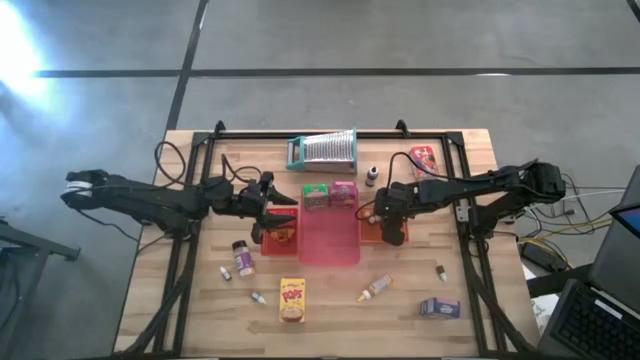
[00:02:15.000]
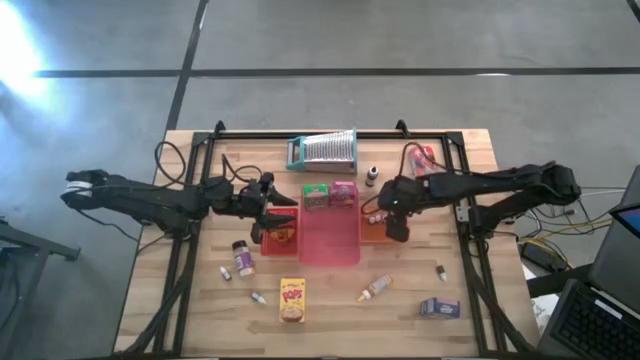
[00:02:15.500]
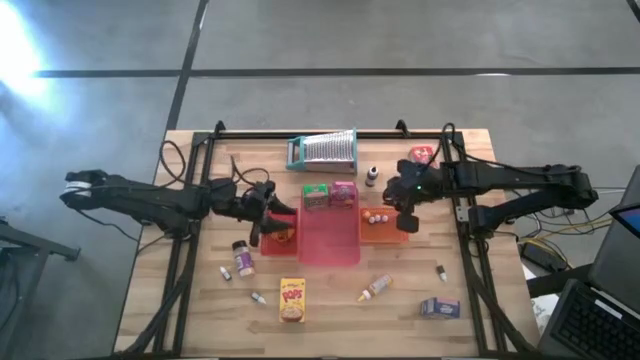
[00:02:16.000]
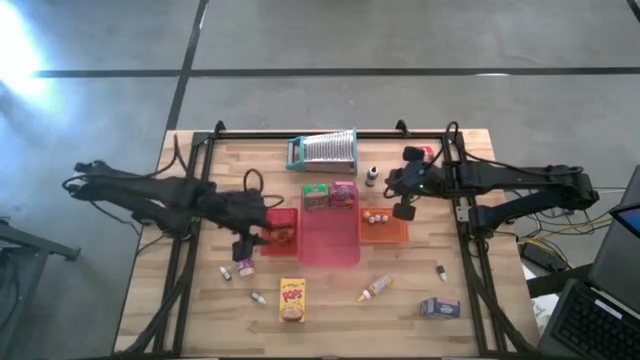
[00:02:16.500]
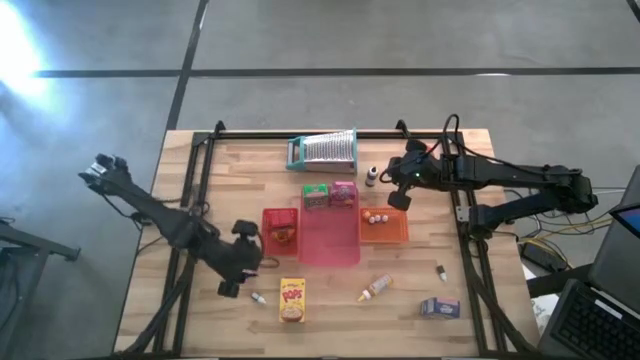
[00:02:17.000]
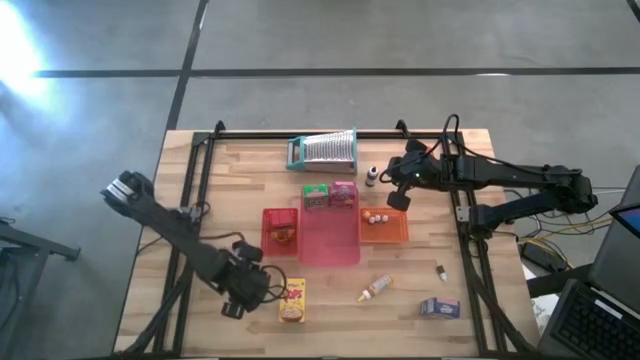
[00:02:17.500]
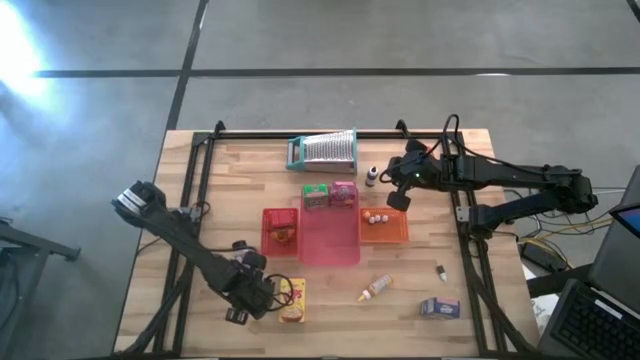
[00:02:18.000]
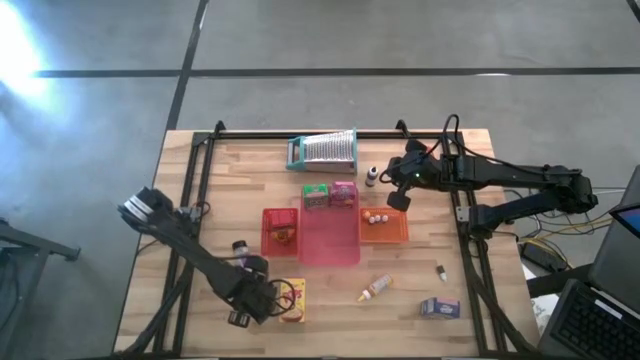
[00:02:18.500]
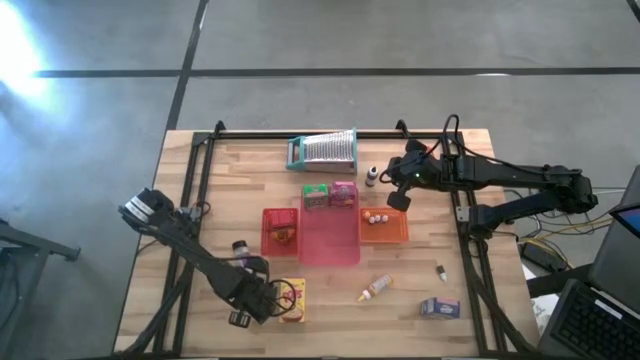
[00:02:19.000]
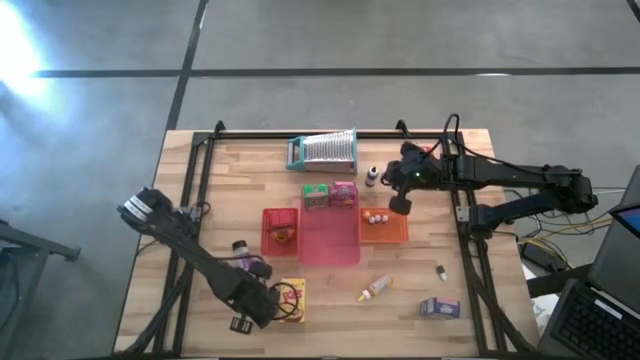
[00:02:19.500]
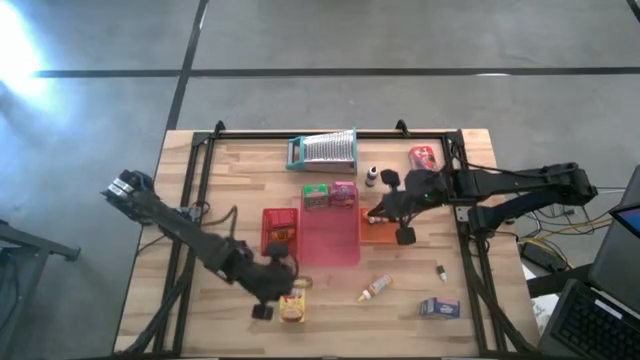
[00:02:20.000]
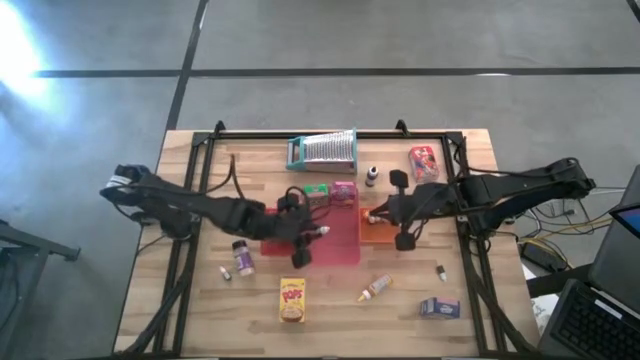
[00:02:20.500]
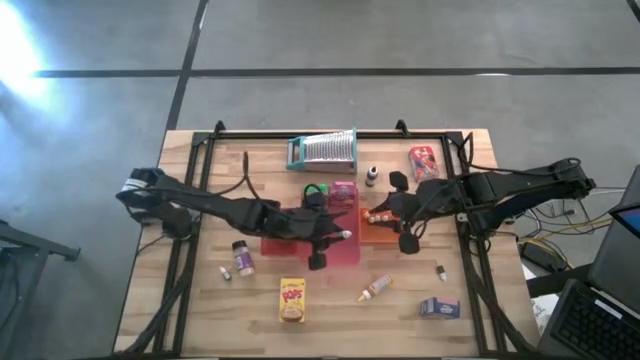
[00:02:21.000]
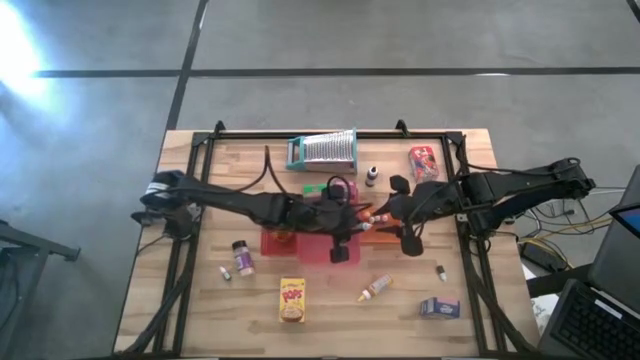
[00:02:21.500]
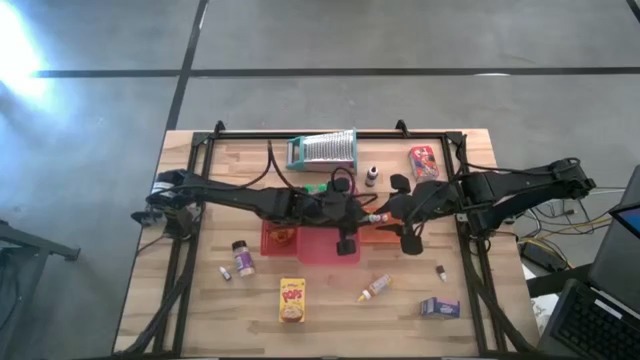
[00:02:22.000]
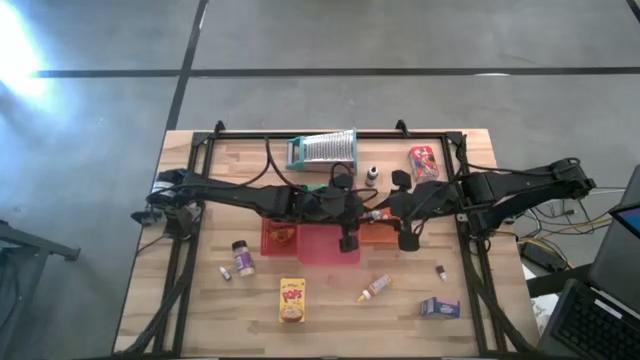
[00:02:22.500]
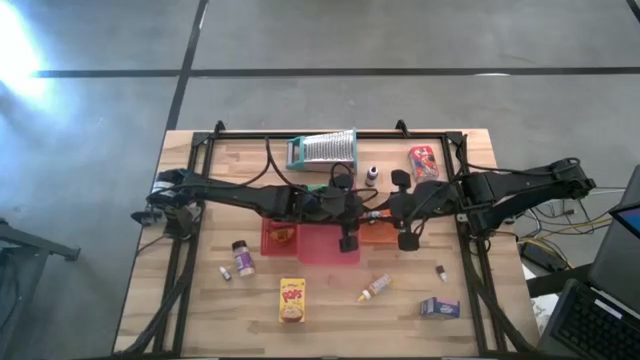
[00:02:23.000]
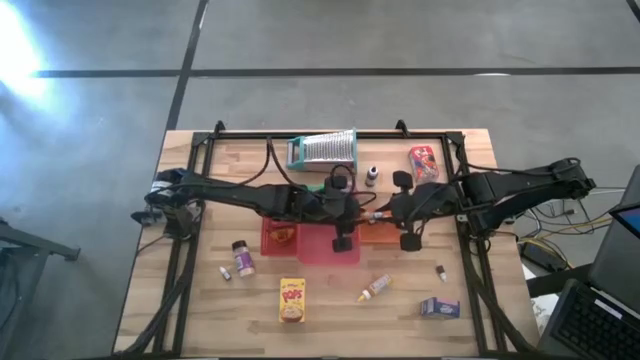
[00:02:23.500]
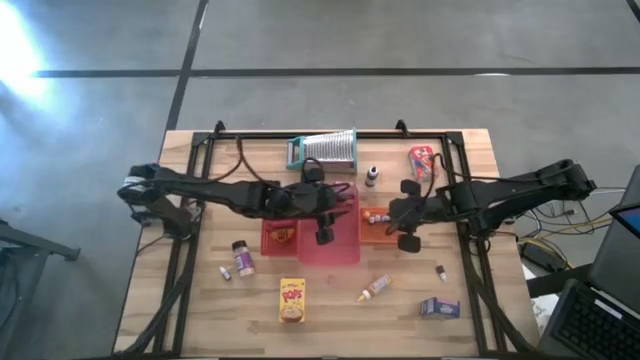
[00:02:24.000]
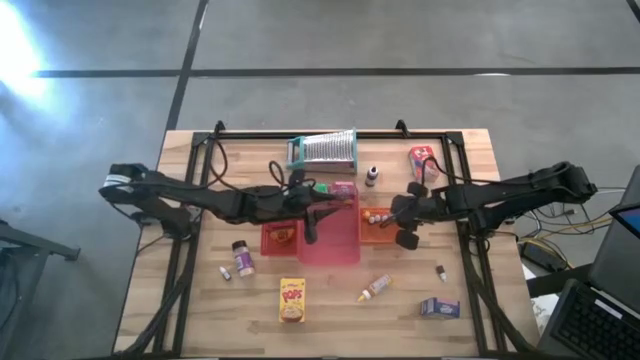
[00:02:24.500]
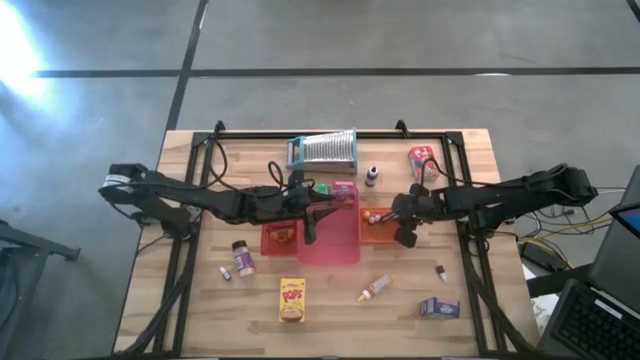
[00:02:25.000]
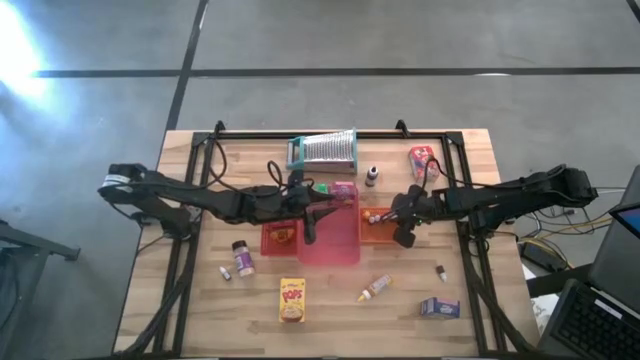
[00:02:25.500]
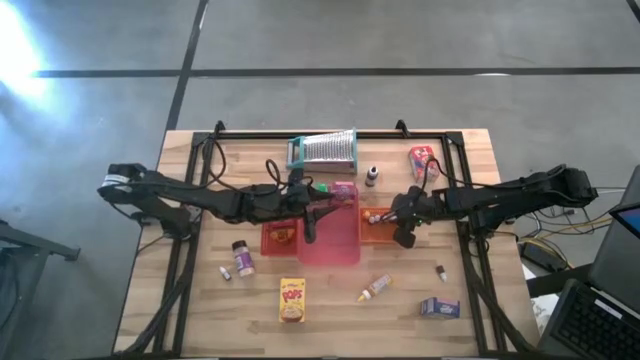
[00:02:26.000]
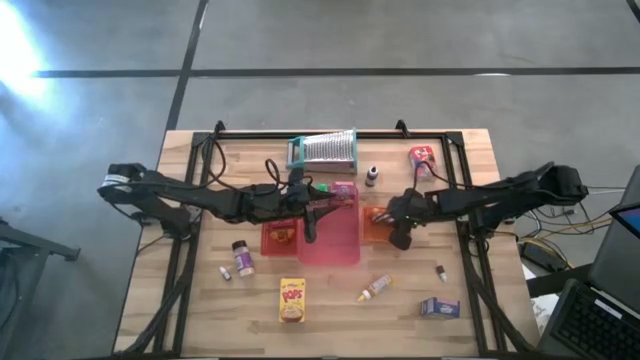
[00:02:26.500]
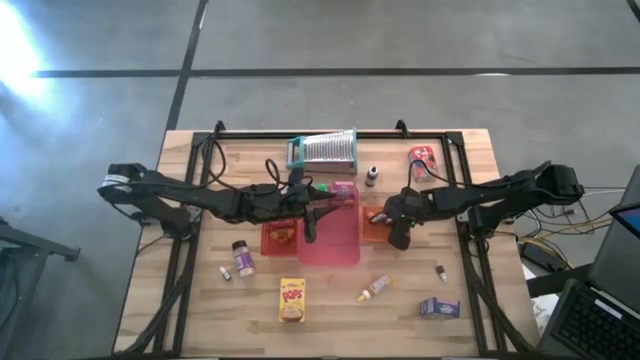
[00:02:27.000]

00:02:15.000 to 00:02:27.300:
Task: Pick & Place Kitchen Items
Put the small green food coloring bottle into the orange bin

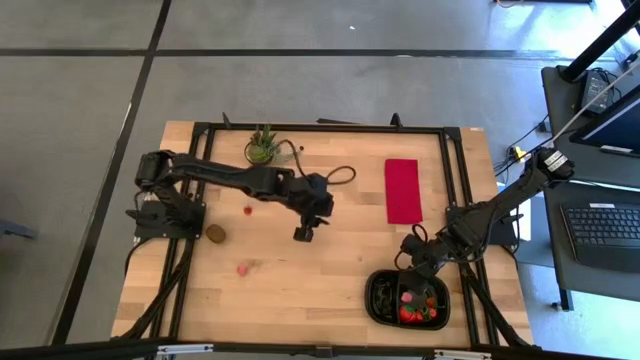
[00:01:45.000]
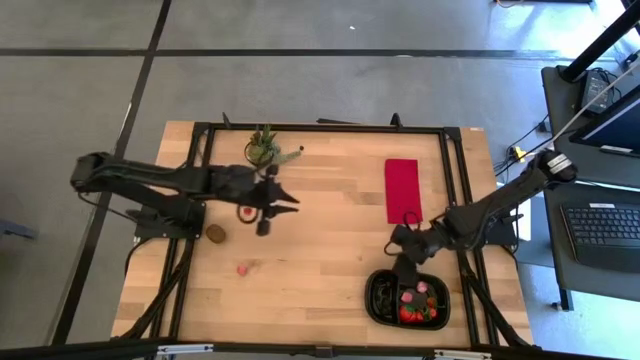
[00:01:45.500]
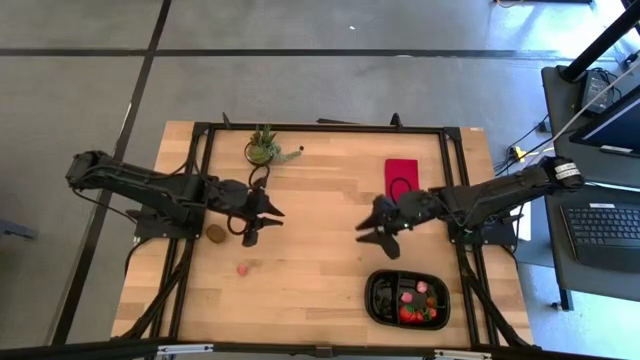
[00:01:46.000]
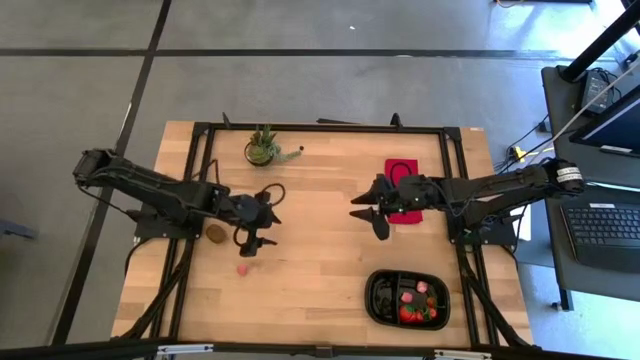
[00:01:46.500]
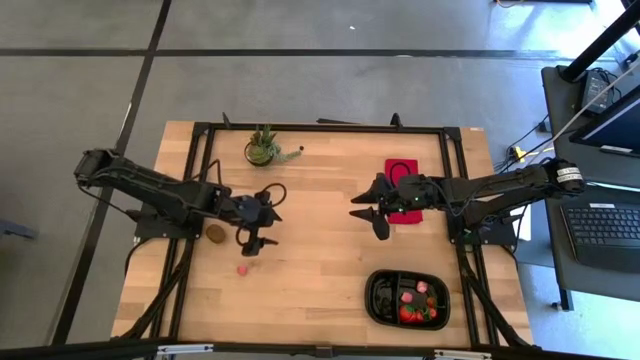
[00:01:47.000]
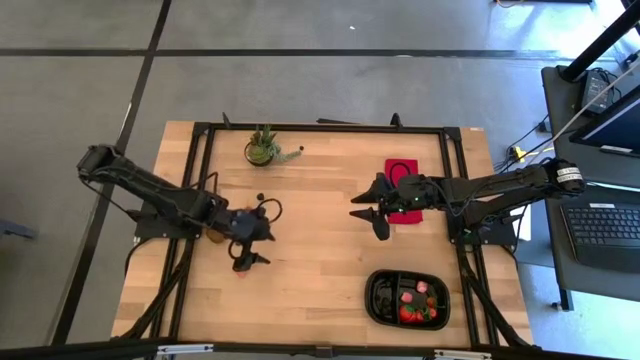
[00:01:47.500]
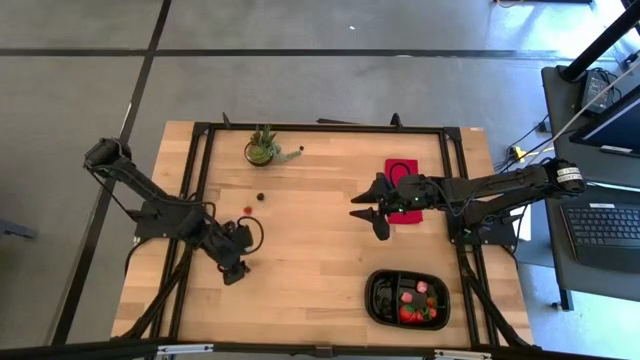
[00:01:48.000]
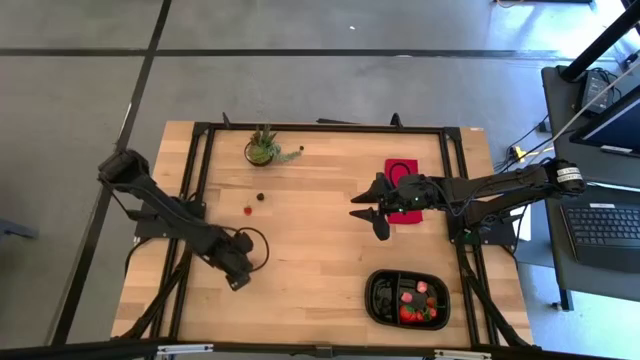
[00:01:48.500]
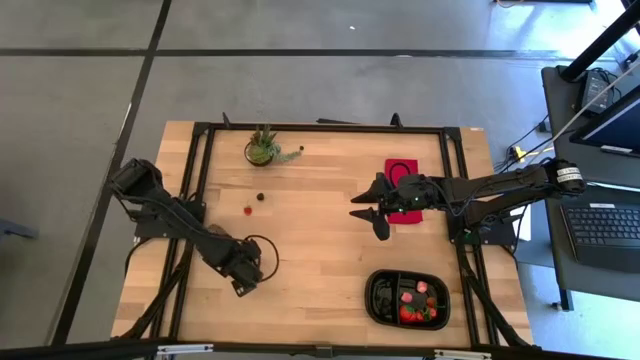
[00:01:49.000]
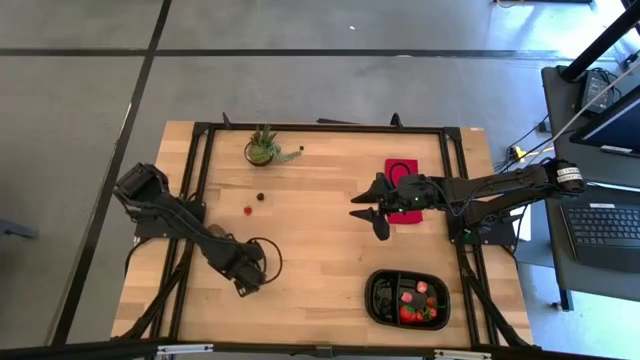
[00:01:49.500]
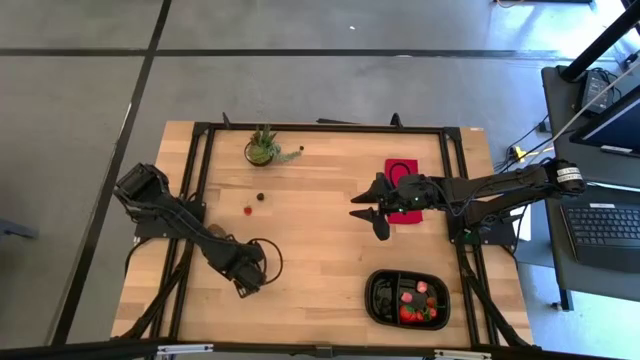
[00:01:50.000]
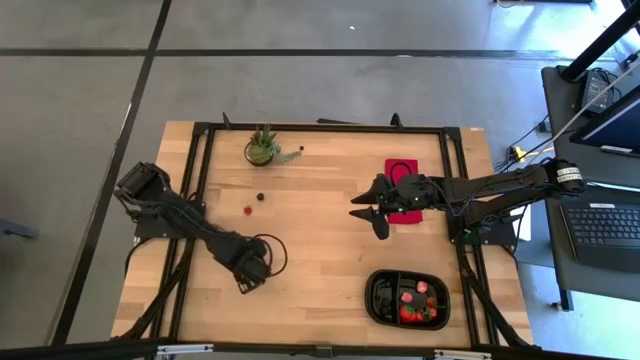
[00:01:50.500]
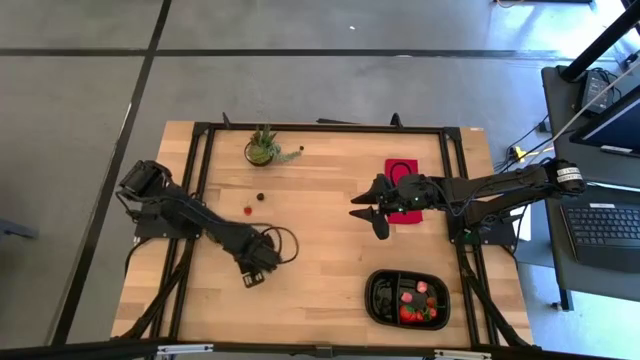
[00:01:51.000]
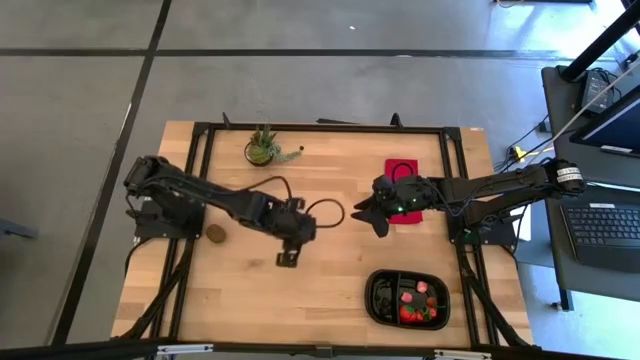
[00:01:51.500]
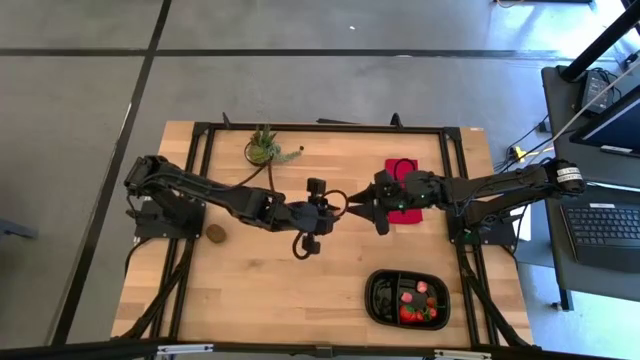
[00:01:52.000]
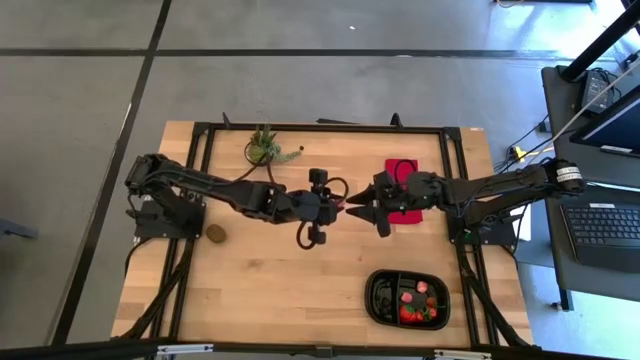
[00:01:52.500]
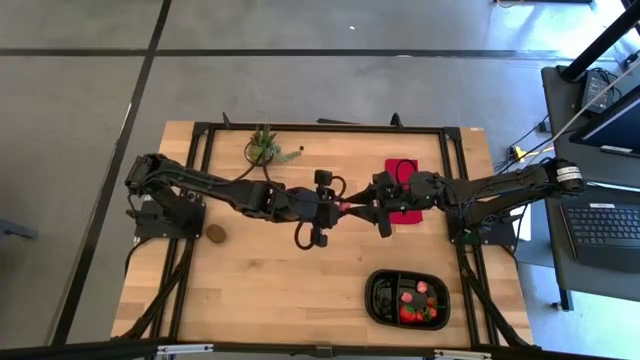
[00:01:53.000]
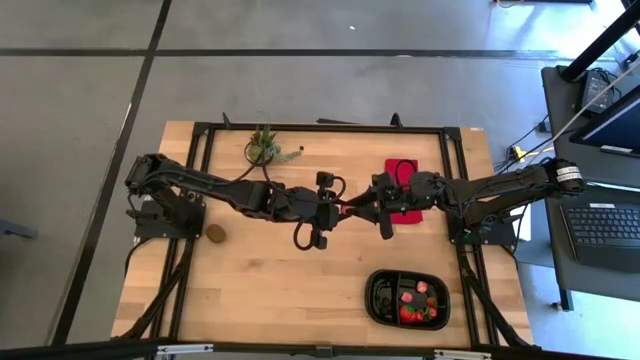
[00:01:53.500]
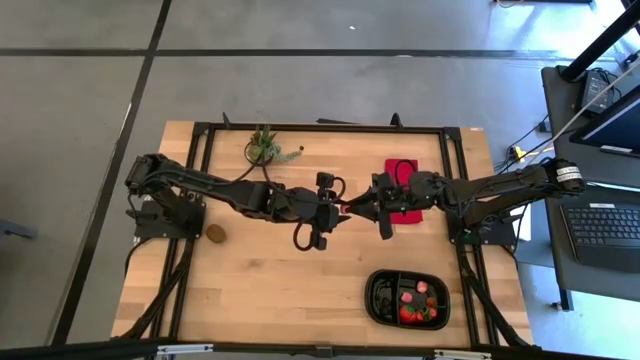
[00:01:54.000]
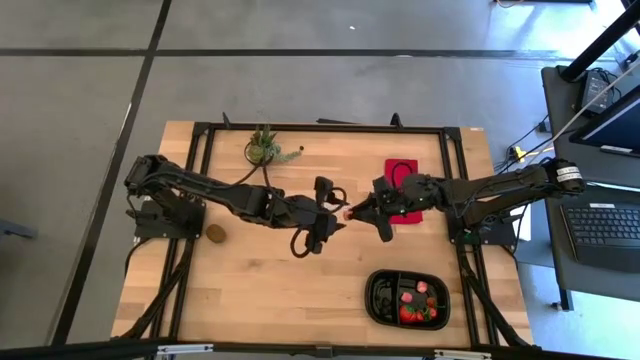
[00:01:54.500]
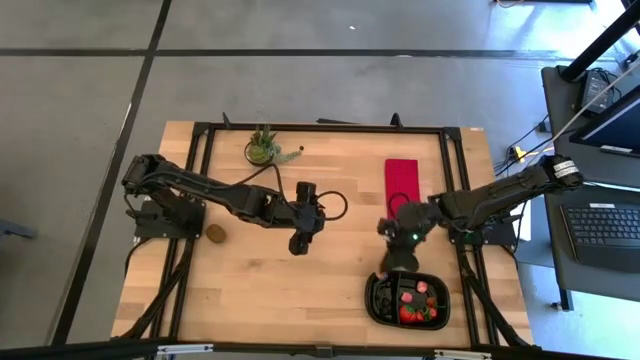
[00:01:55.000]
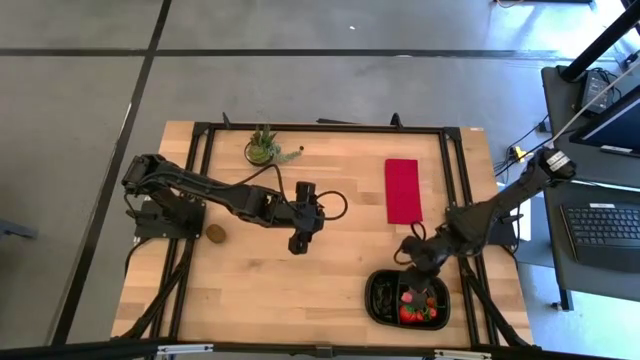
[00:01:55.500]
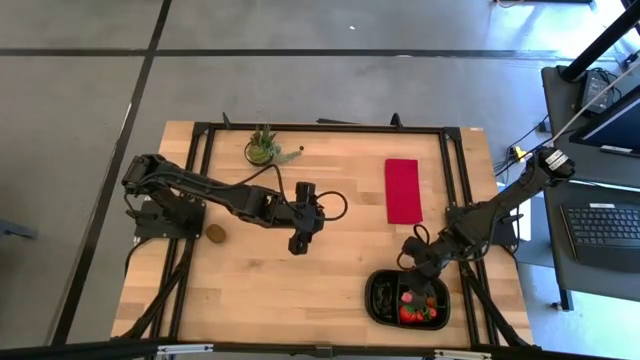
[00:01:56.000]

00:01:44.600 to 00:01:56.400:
Task: Pick and placing Produce into tupperware
Put the peach into the right of the black bin
